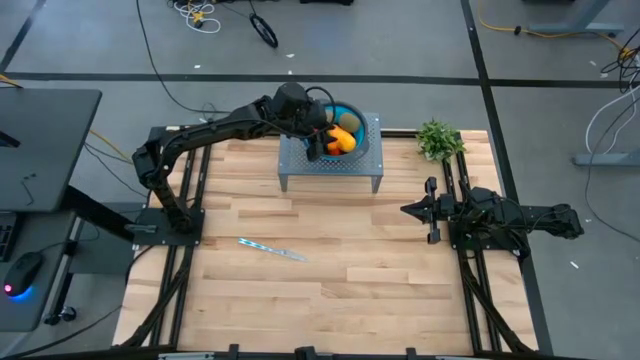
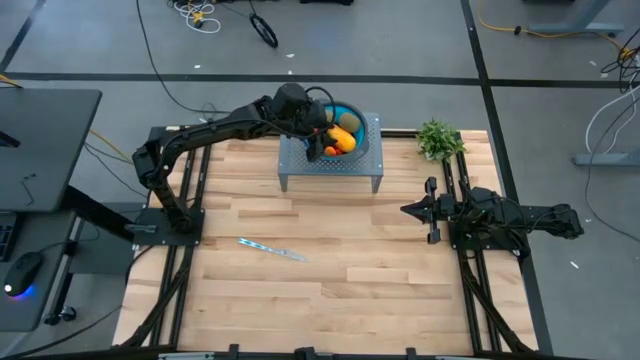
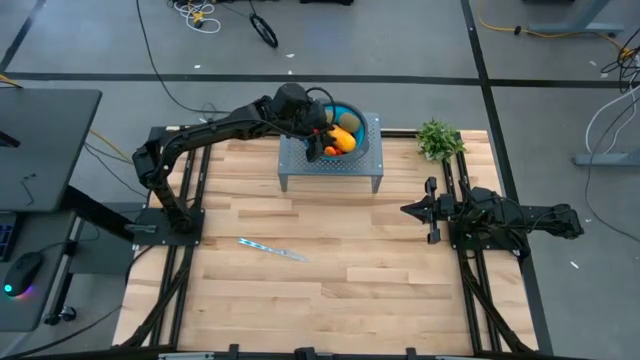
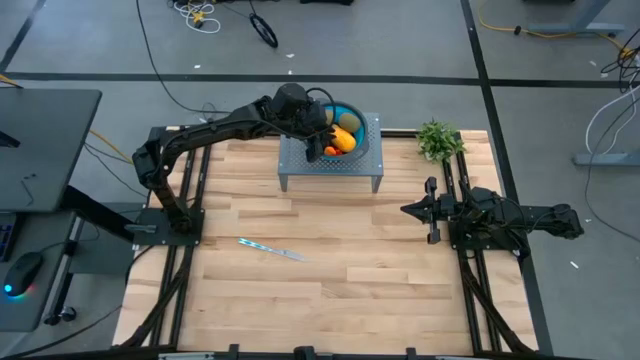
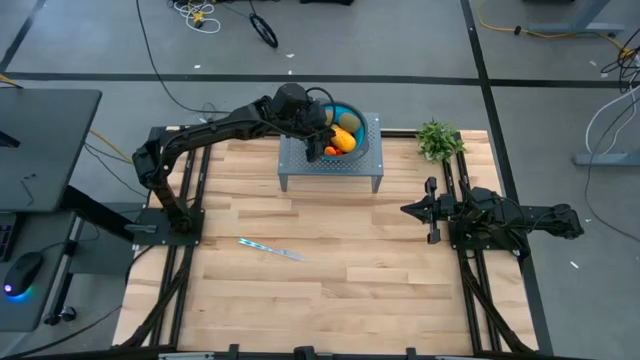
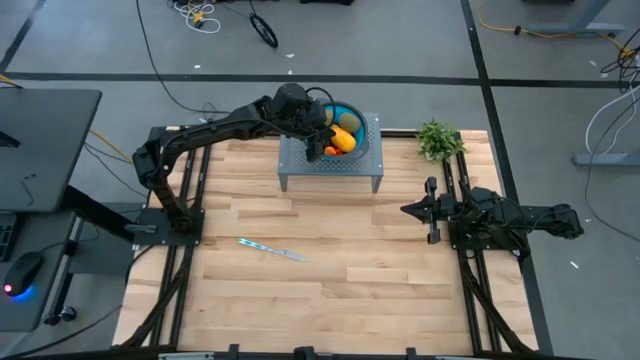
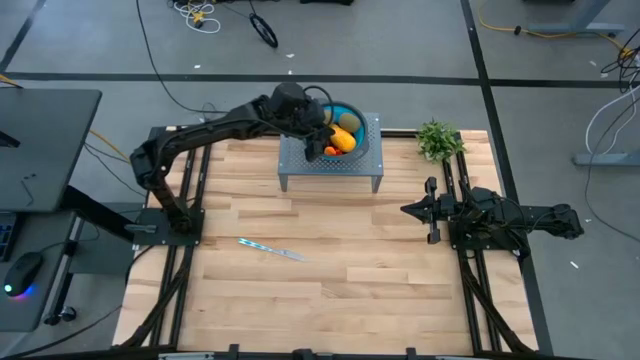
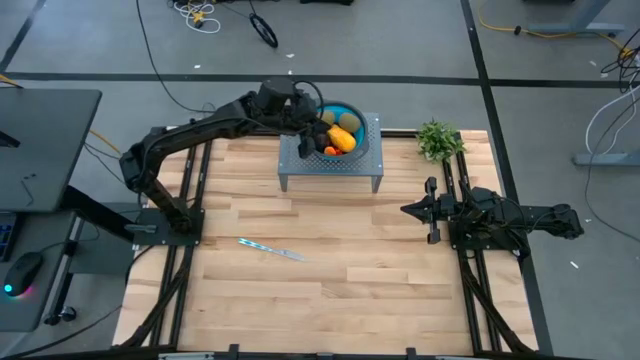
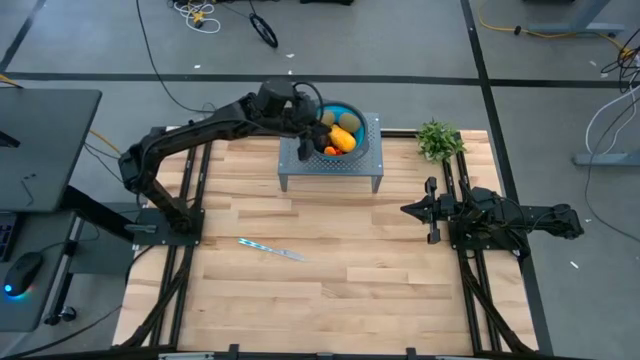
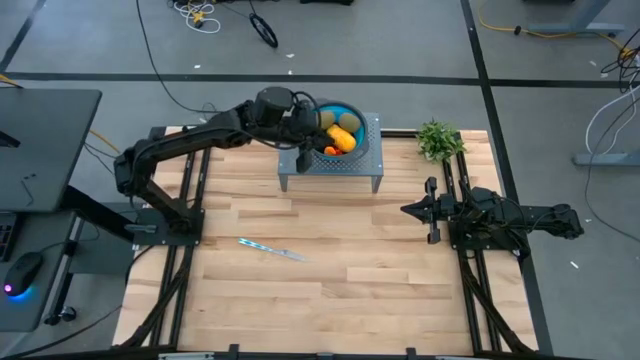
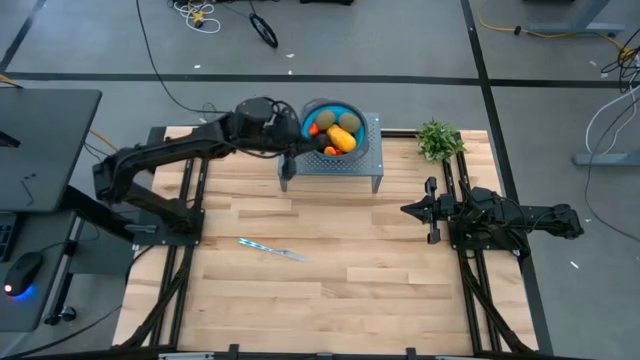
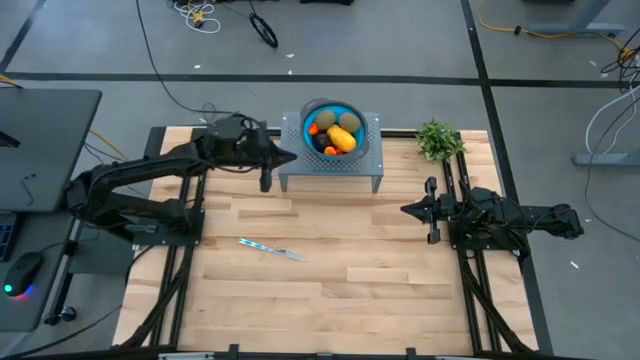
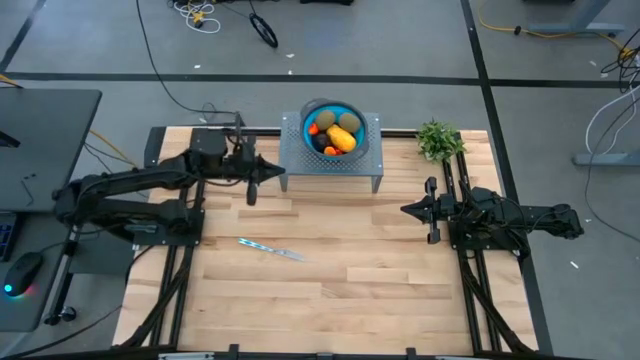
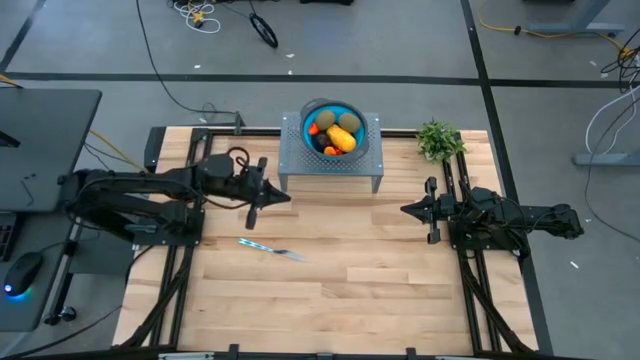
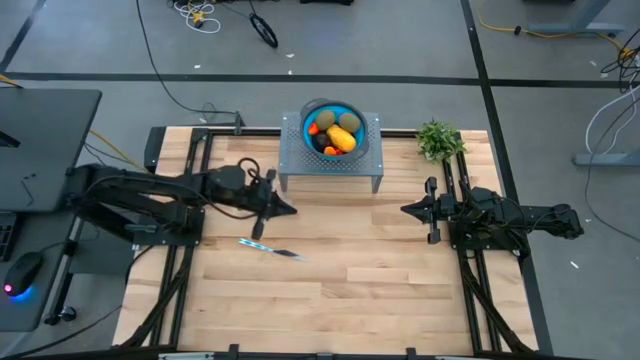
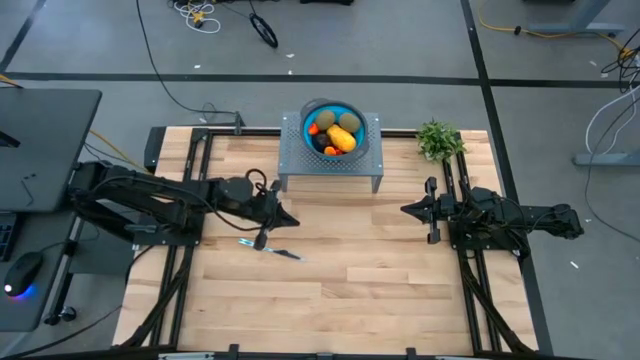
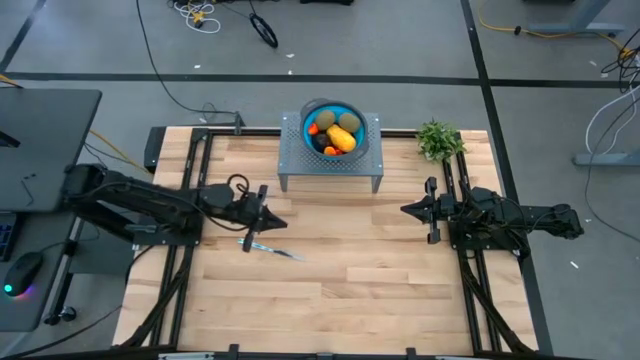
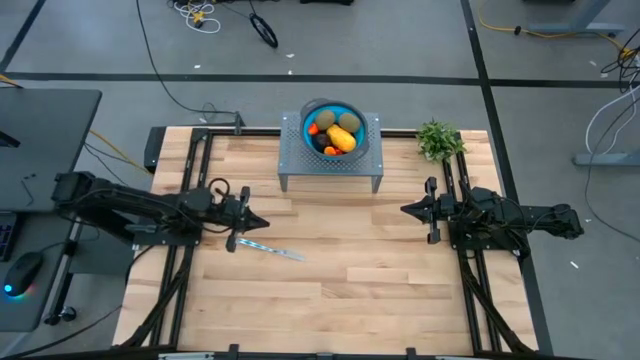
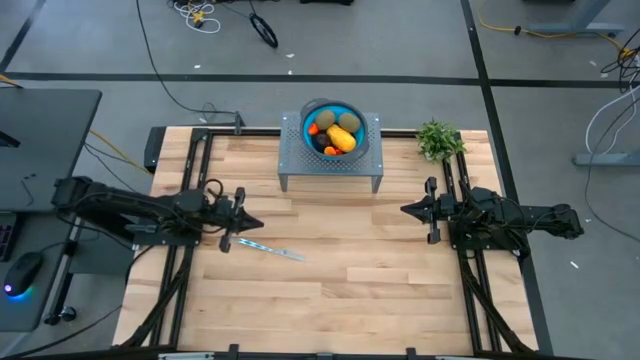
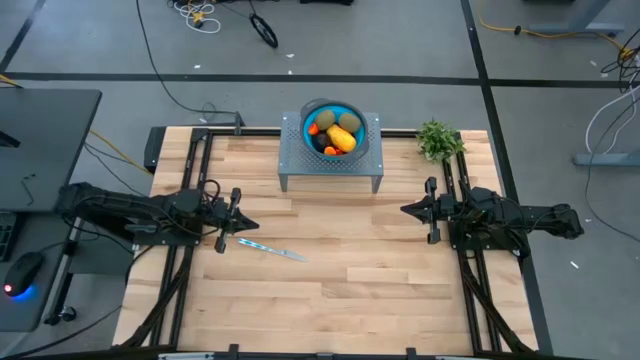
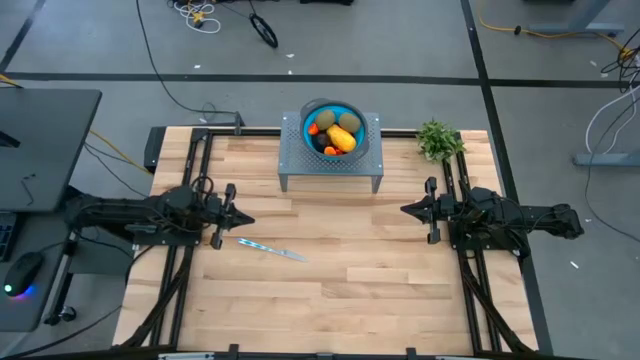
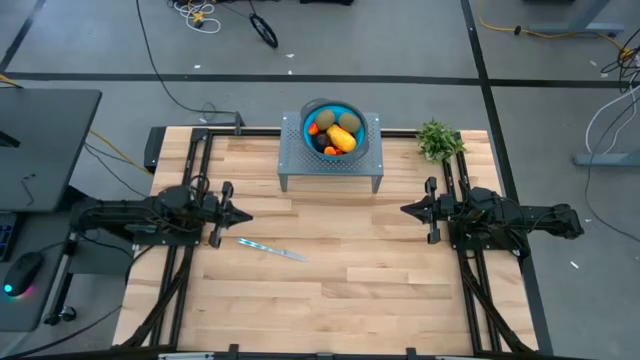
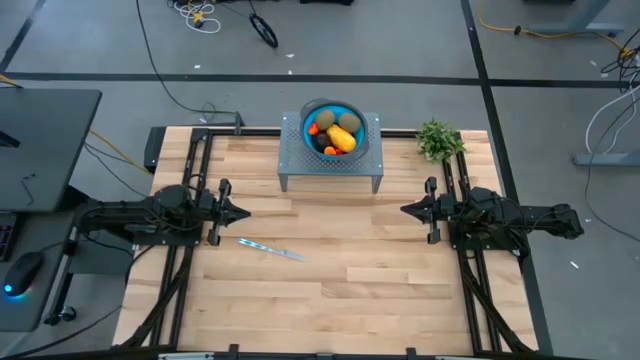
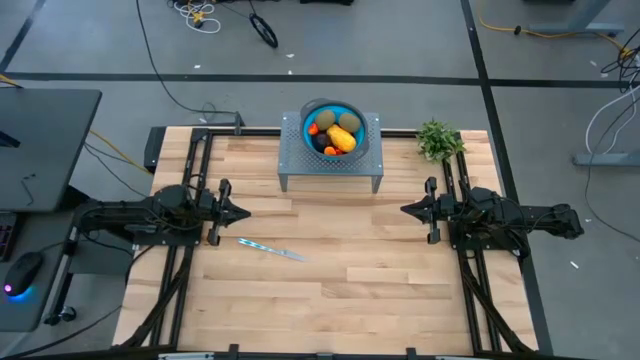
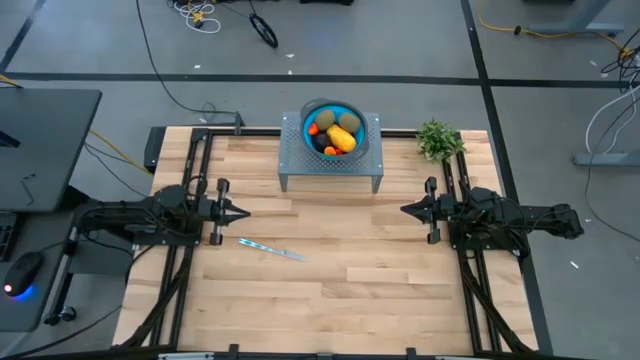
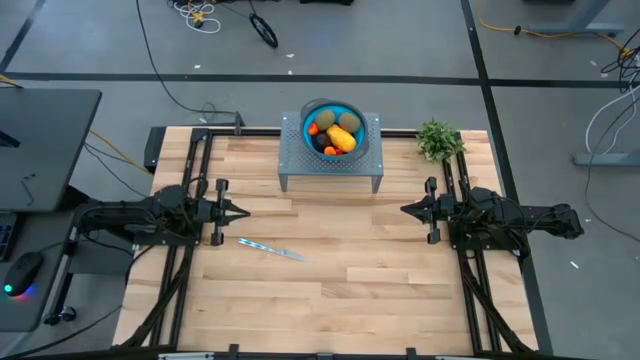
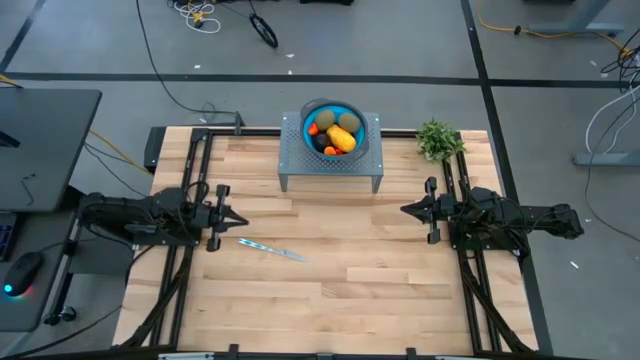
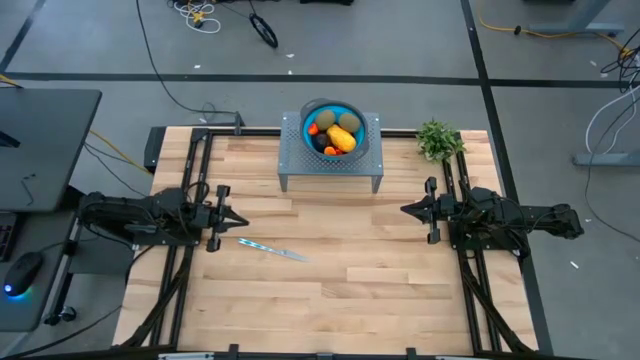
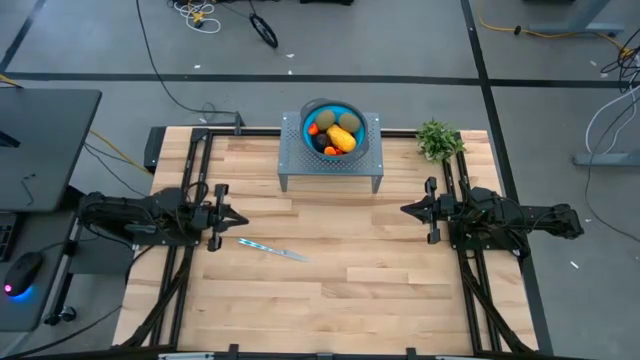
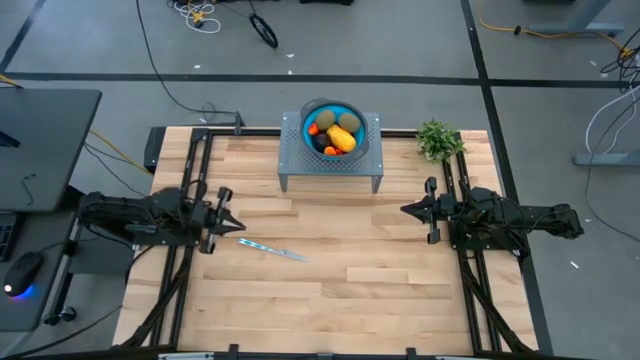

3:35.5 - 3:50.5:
Task: Pick & Place Fruit
Put the knife on the shelf
